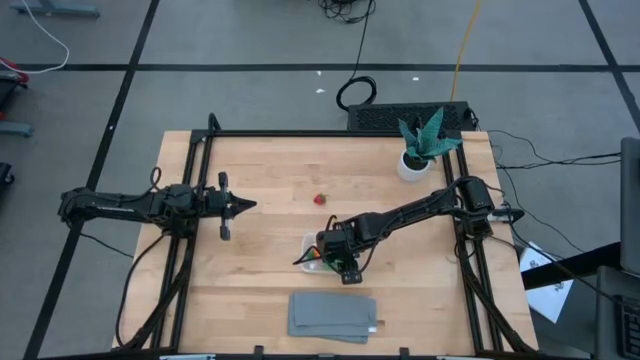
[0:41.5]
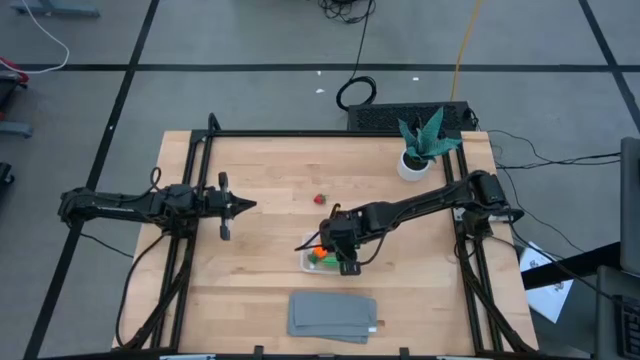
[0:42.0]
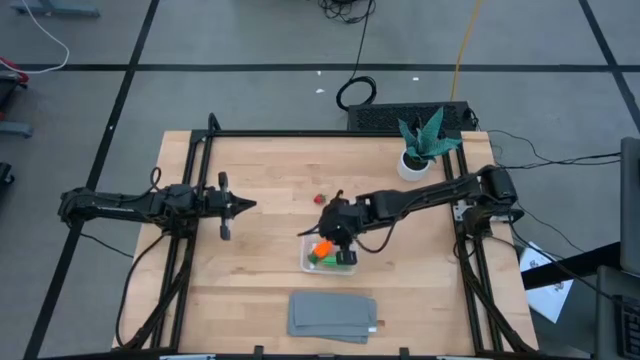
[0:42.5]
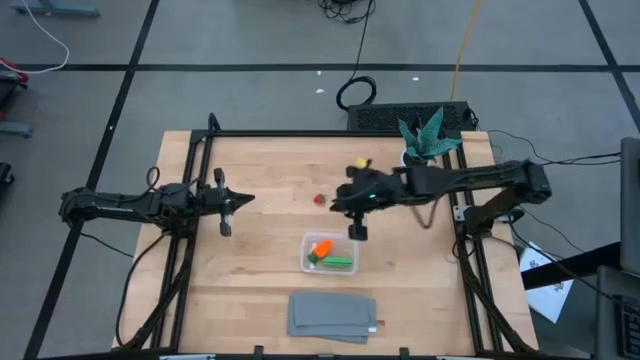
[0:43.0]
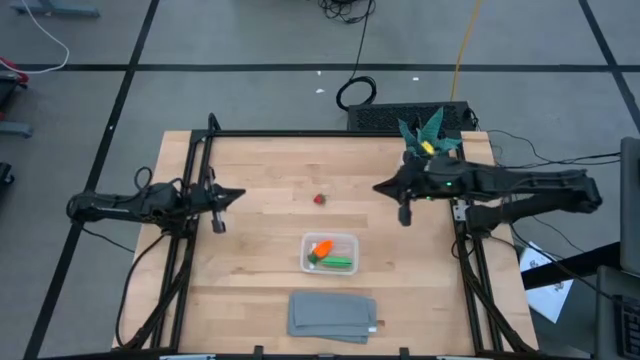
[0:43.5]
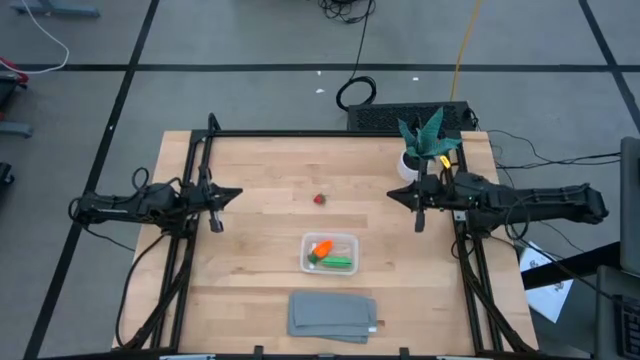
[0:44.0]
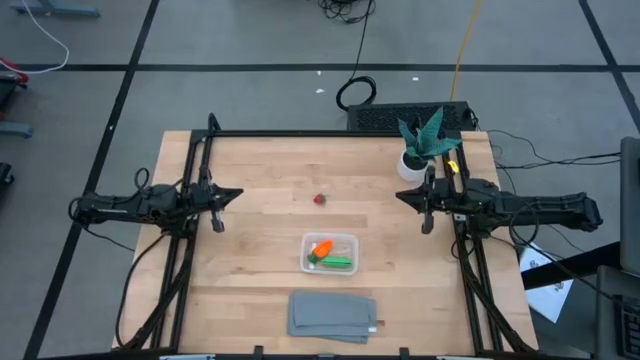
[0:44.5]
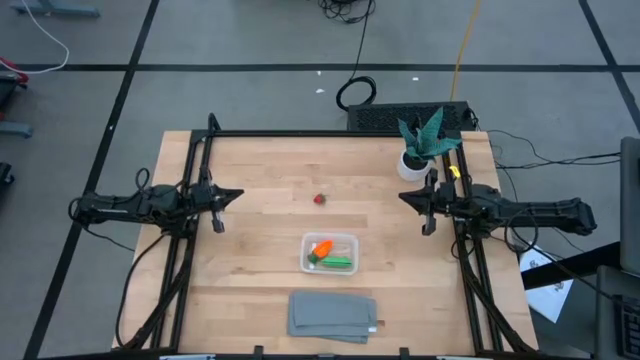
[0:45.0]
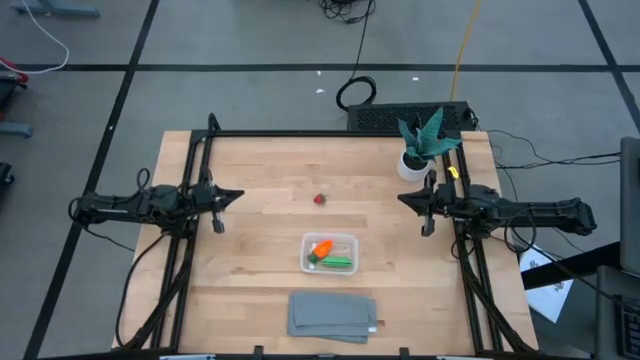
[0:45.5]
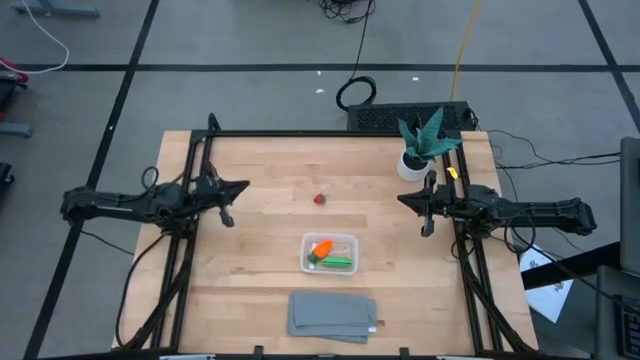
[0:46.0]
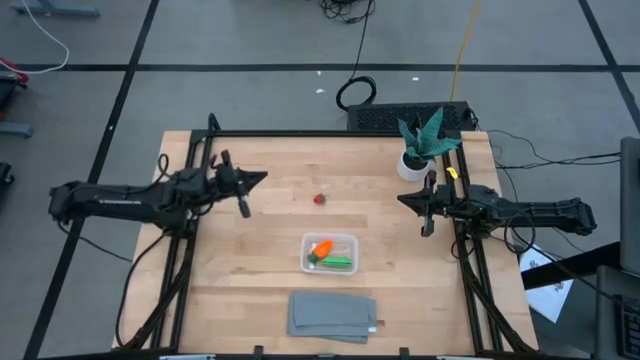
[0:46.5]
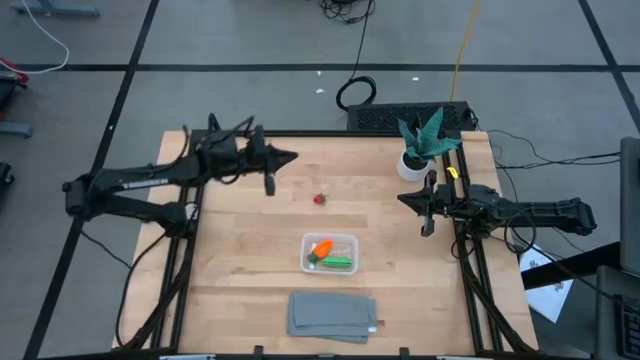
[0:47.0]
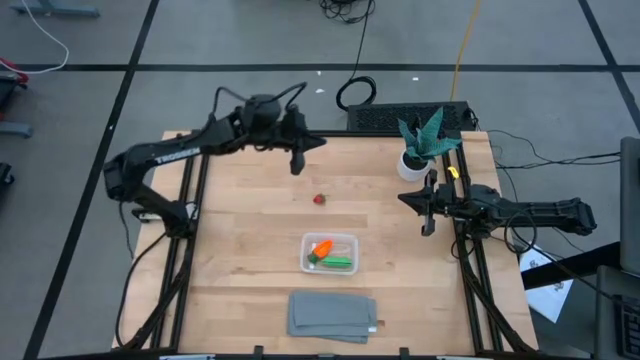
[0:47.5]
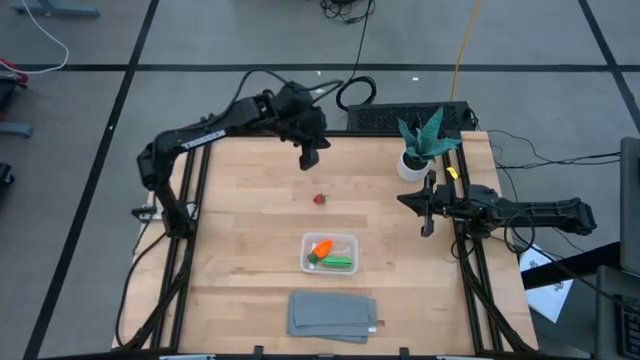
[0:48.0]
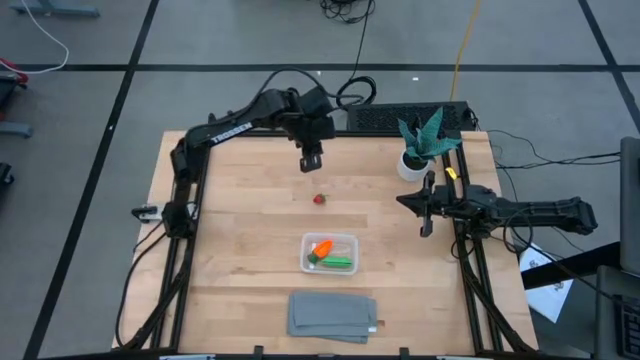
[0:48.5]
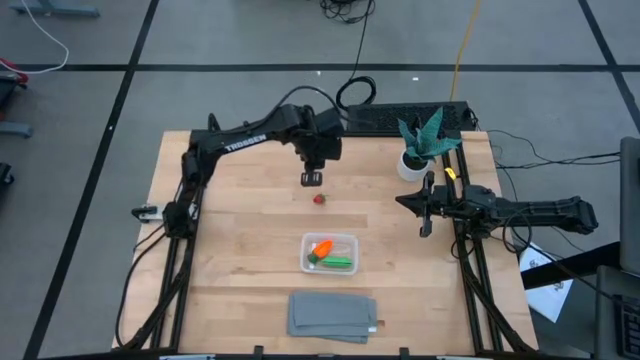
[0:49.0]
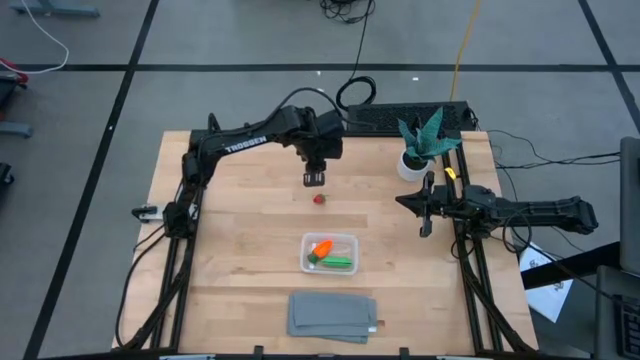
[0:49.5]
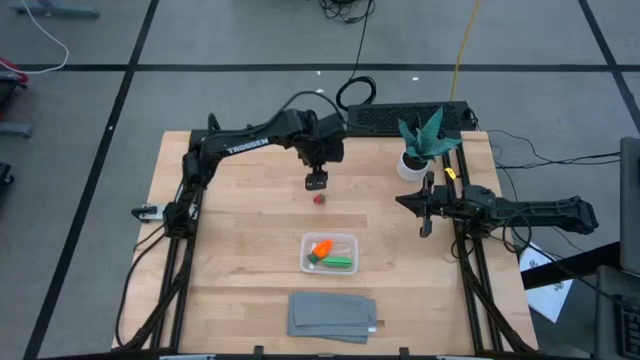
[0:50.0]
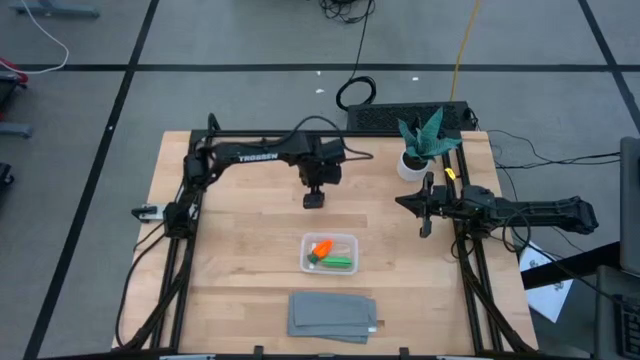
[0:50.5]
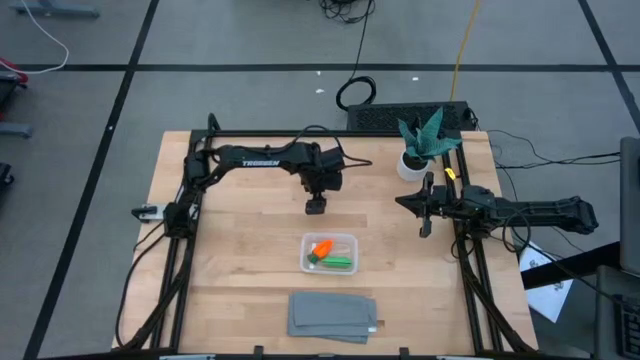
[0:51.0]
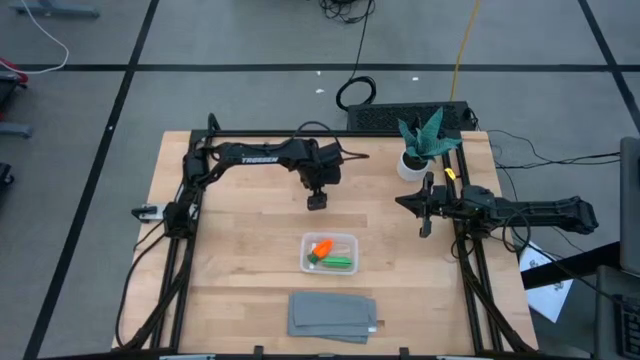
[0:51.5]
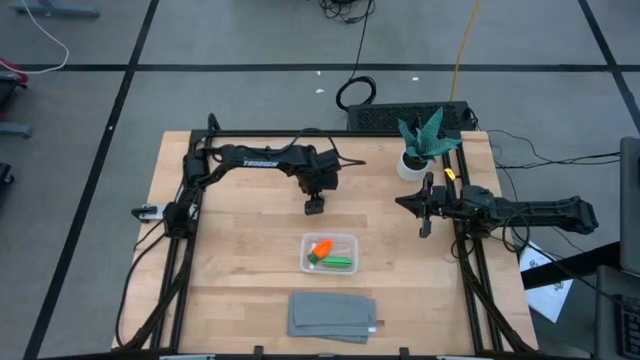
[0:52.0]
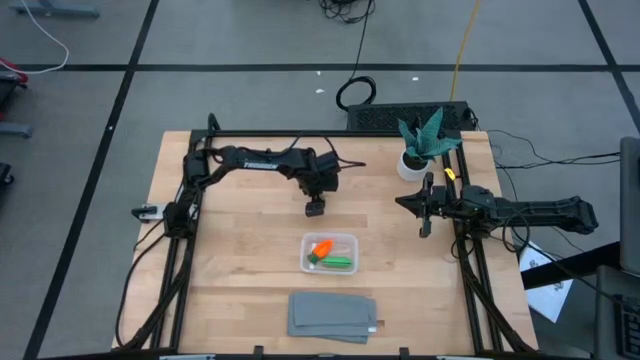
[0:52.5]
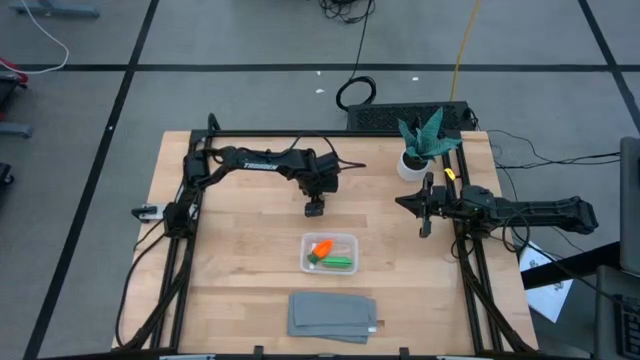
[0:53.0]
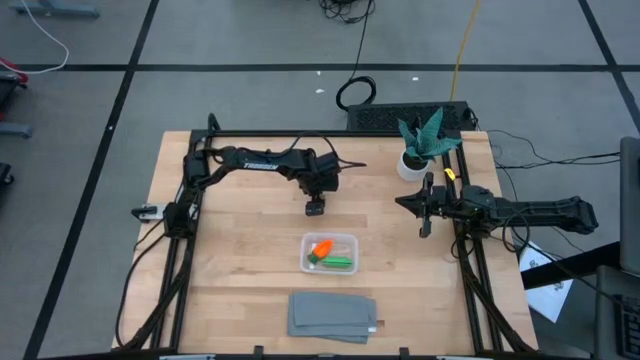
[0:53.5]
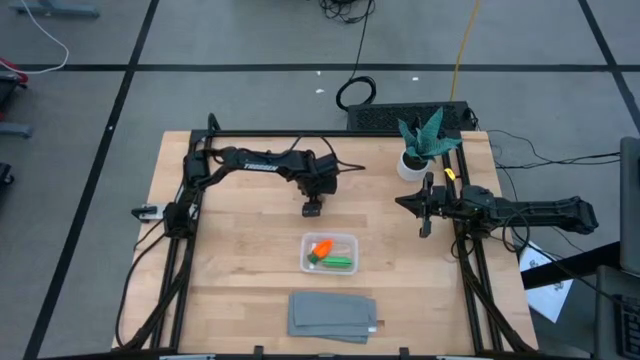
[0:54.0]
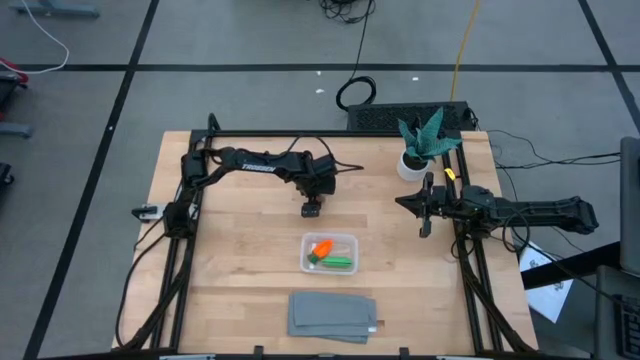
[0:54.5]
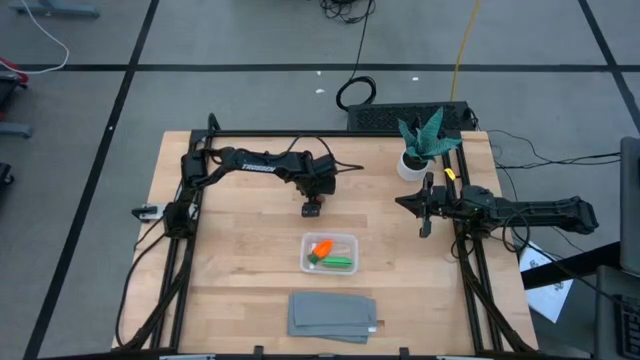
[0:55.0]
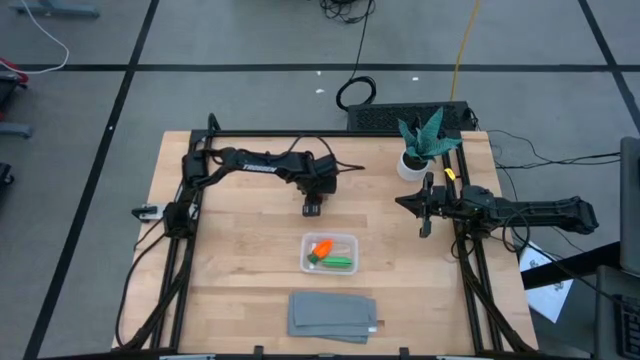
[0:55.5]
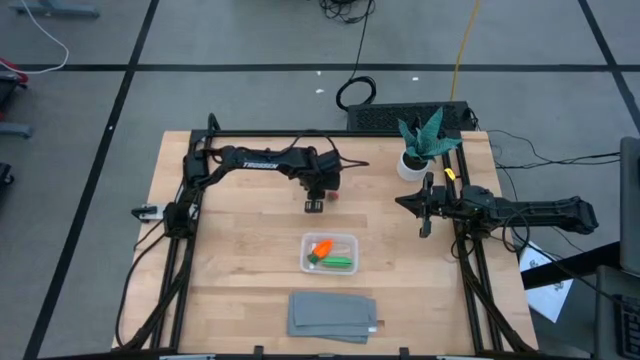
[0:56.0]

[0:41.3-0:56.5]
Task: Pick and placing Produce into tupperware
Put the strawberry into the transparent bin

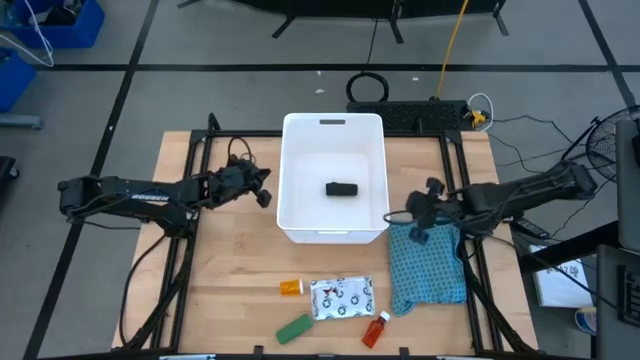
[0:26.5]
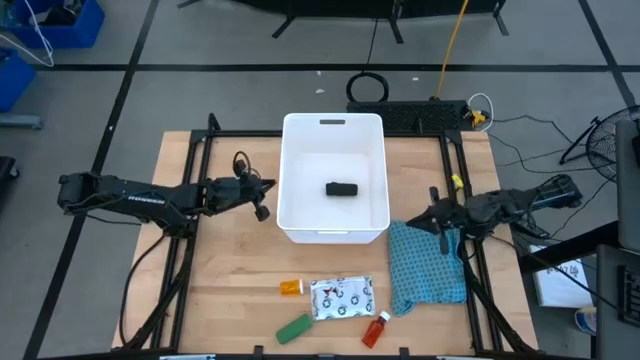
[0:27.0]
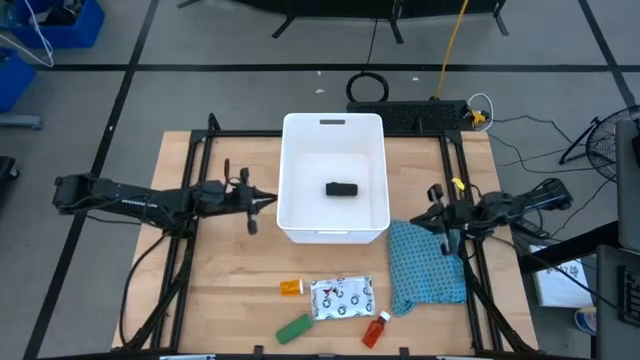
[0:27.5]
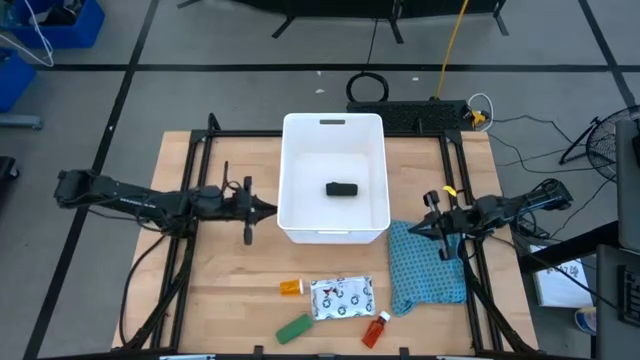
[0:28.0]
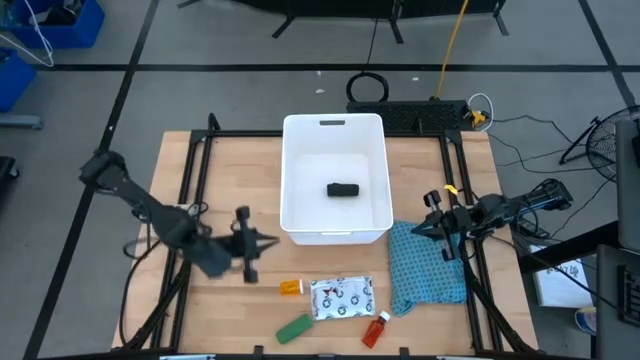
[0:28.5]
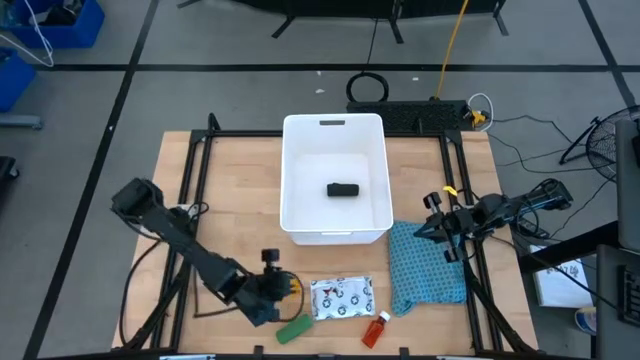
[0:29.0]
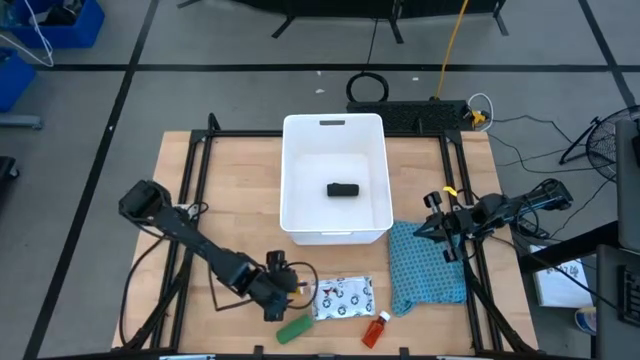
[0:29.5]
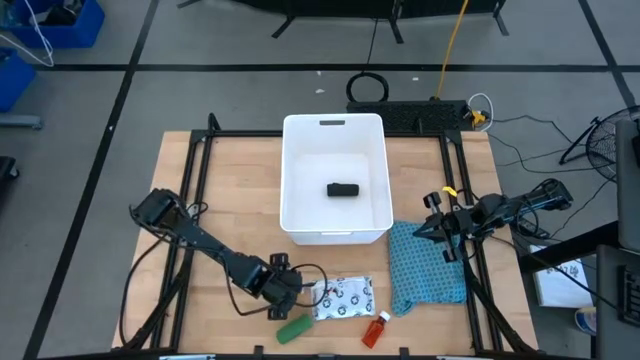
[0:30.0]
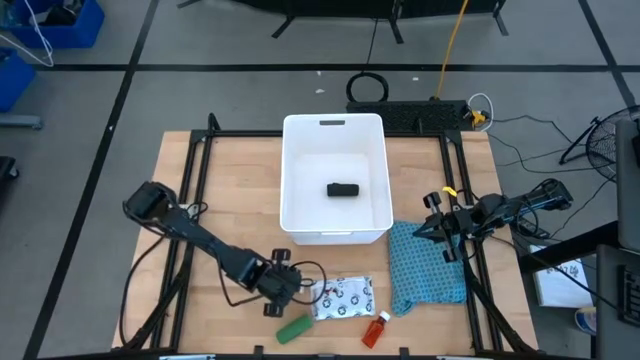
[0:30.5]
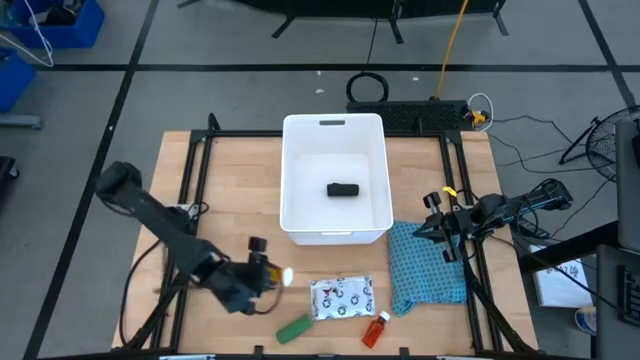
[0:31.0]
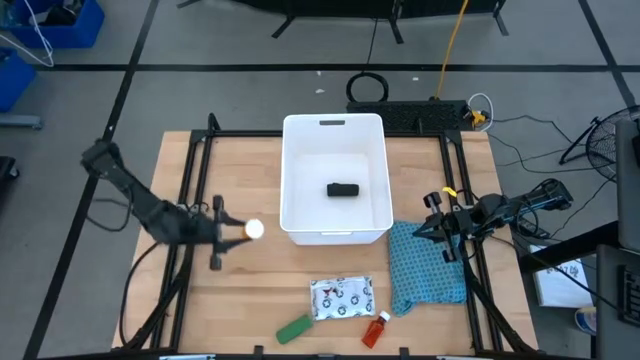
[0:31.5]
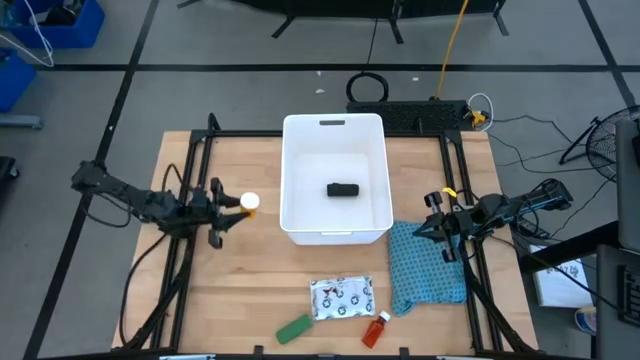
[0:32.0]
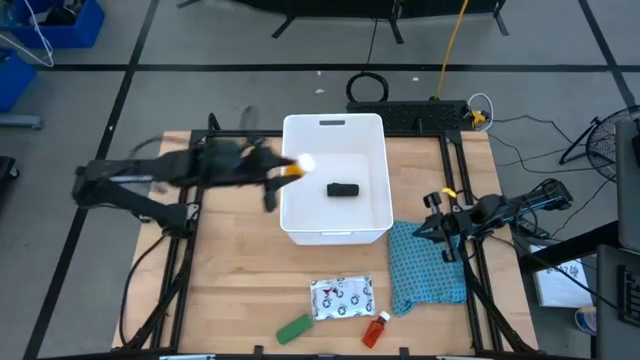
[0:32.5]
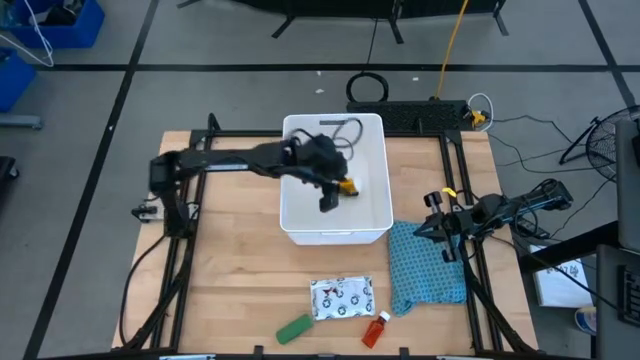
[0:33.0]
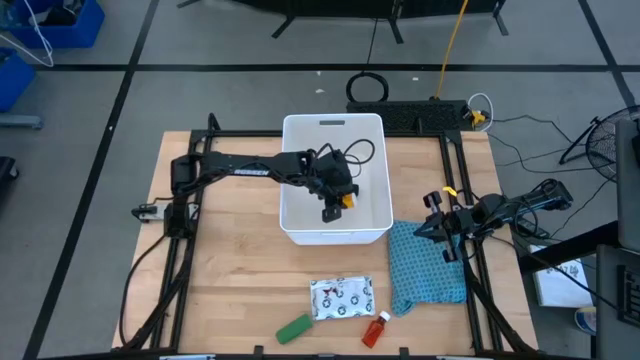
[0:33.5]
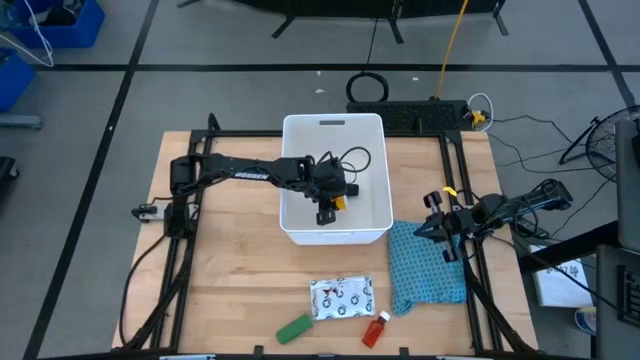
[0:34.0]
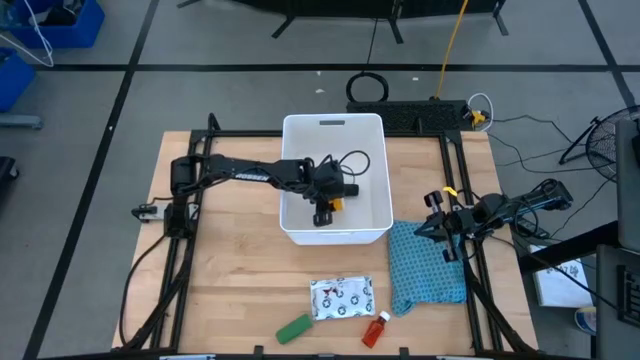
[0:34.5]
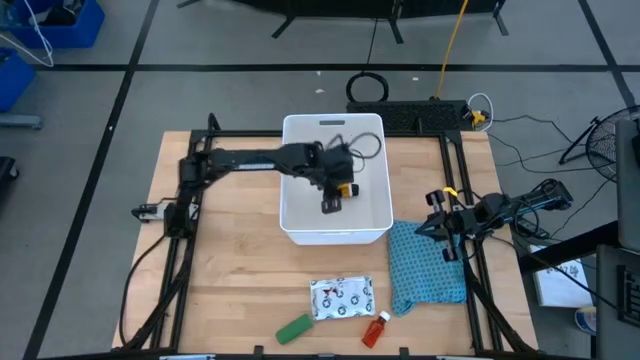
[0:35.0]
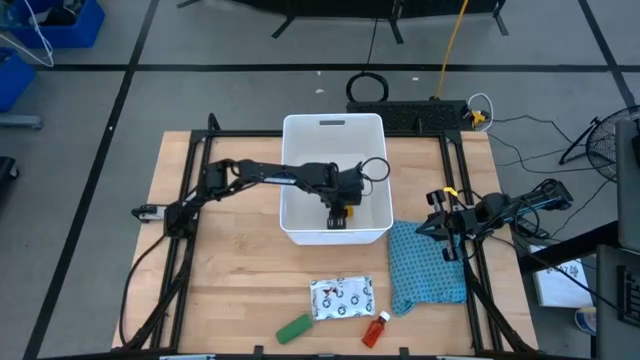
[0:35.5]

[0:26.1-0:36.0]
Task: Pick & place medical supplies in basket/bin
Put the orange pill bottle into the white bin
